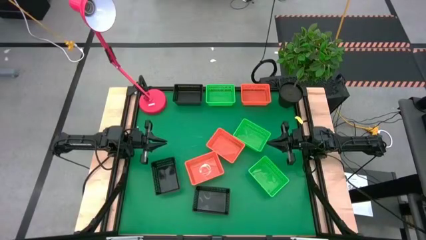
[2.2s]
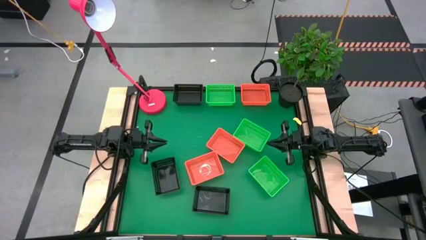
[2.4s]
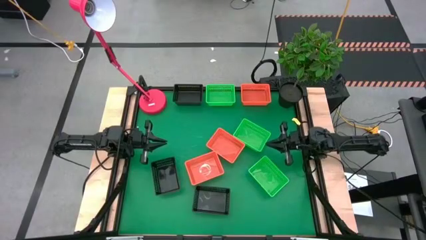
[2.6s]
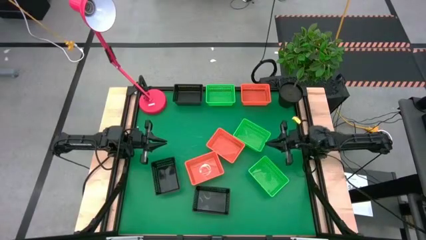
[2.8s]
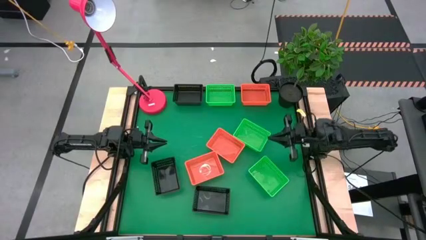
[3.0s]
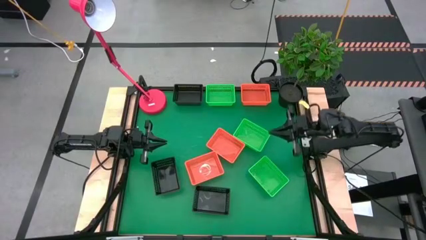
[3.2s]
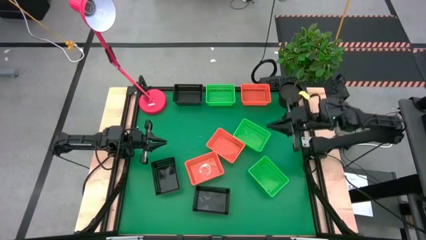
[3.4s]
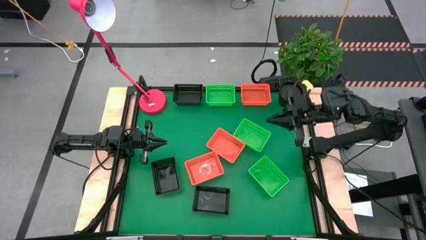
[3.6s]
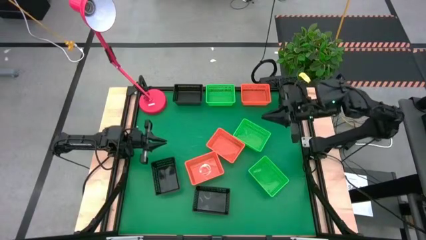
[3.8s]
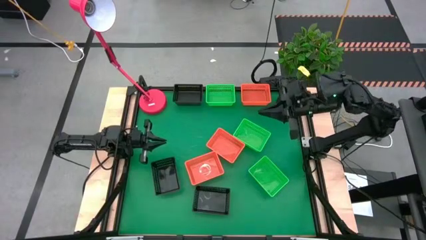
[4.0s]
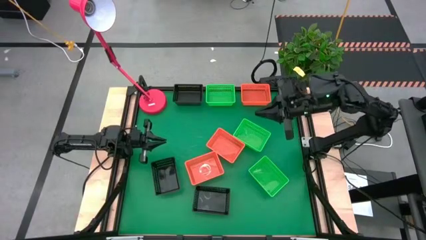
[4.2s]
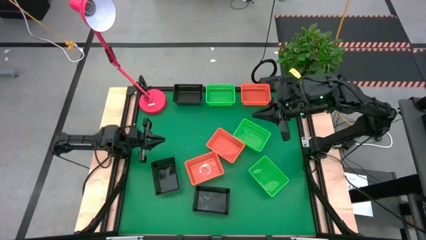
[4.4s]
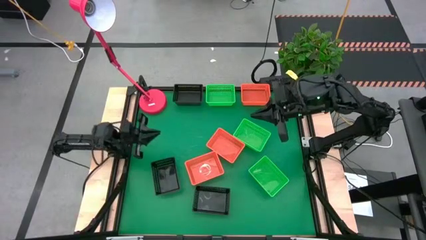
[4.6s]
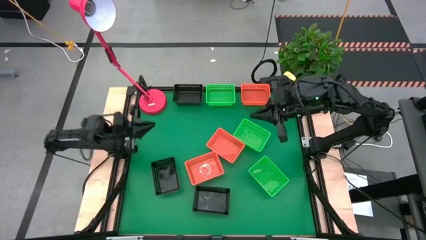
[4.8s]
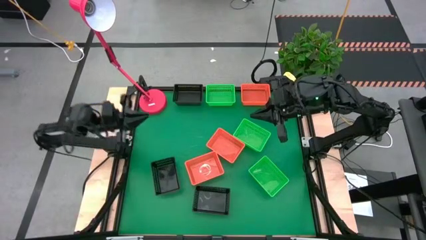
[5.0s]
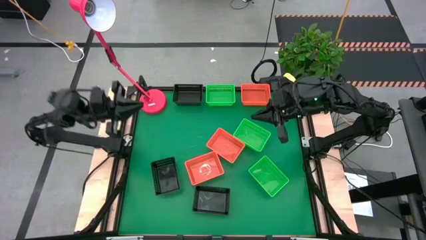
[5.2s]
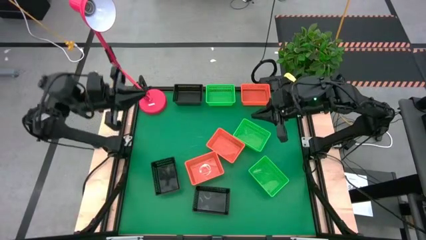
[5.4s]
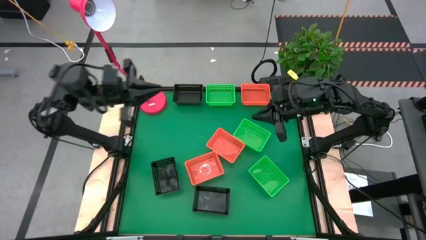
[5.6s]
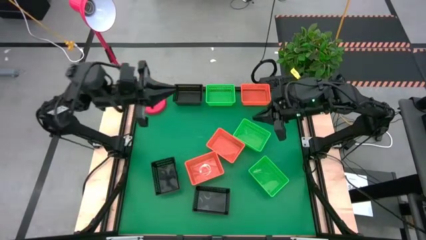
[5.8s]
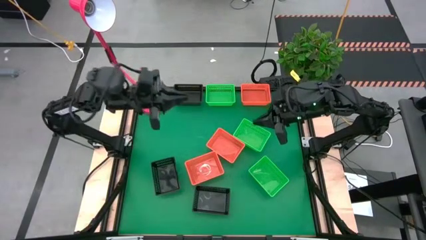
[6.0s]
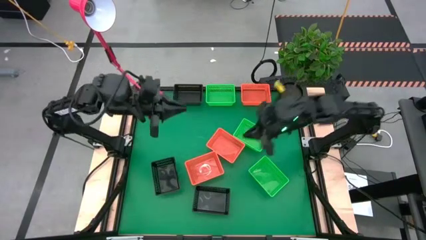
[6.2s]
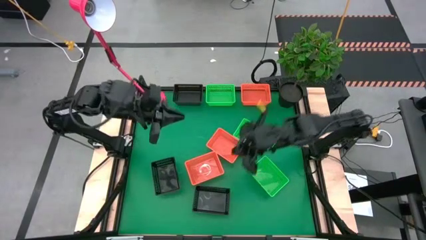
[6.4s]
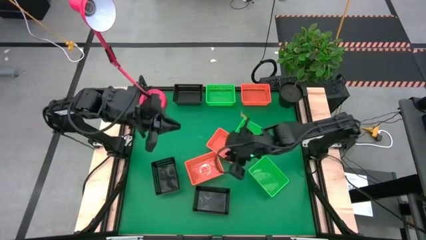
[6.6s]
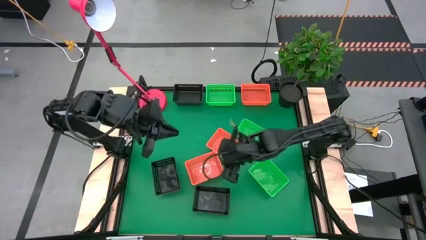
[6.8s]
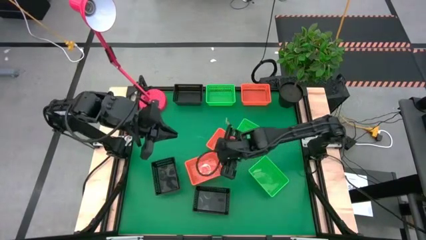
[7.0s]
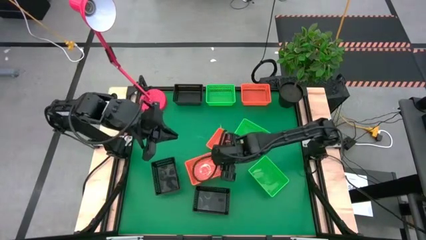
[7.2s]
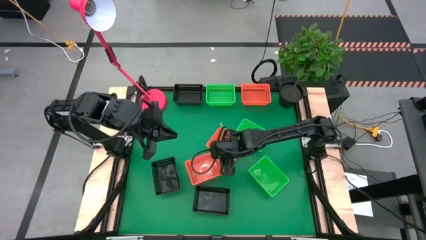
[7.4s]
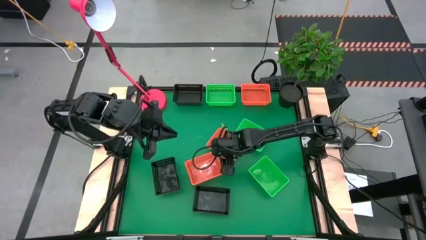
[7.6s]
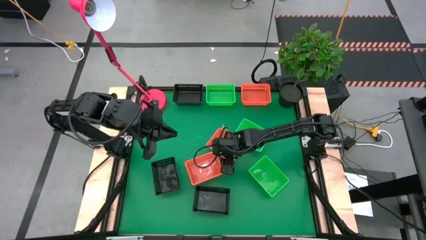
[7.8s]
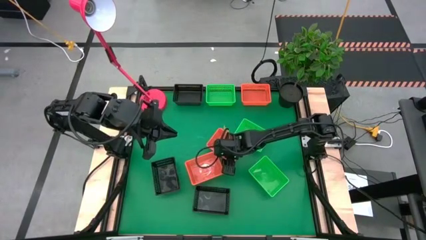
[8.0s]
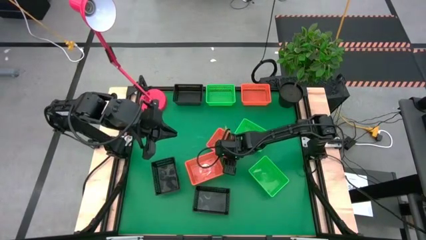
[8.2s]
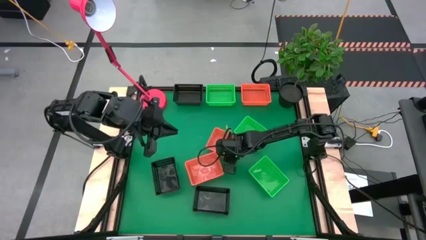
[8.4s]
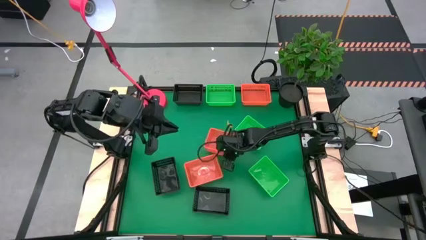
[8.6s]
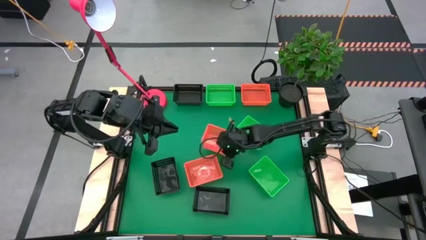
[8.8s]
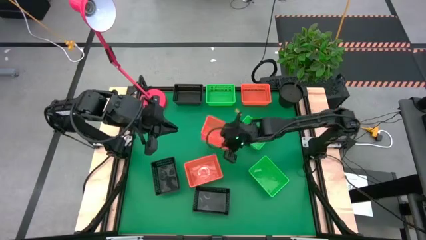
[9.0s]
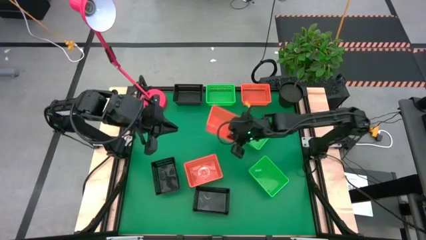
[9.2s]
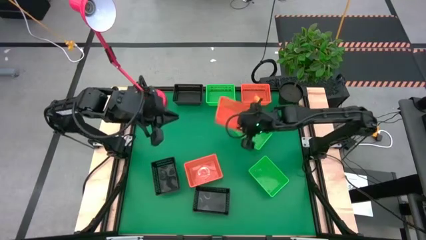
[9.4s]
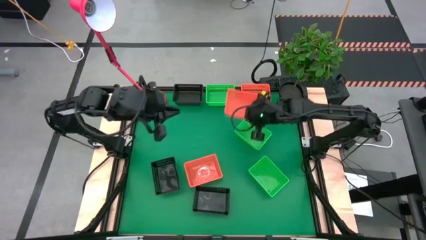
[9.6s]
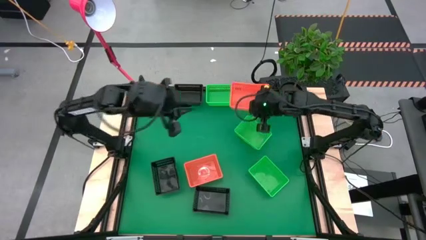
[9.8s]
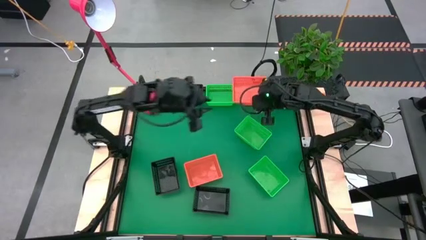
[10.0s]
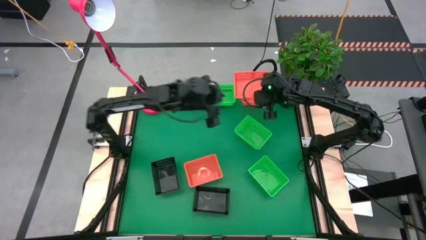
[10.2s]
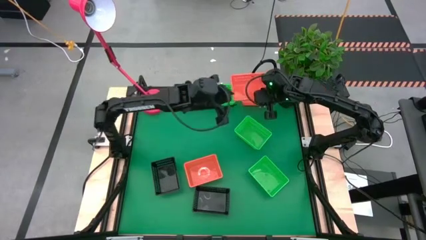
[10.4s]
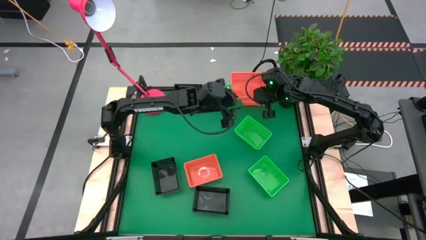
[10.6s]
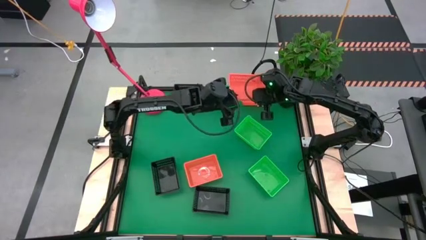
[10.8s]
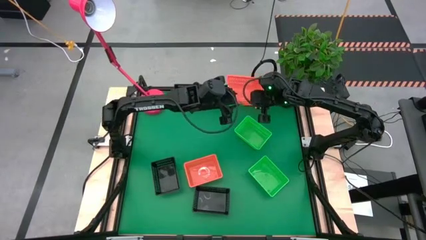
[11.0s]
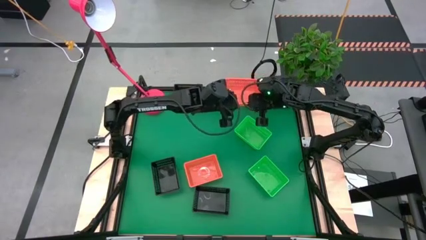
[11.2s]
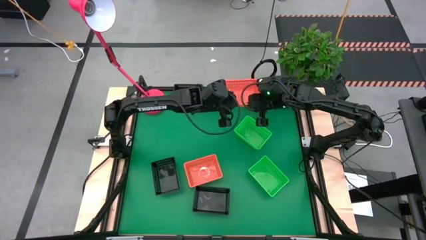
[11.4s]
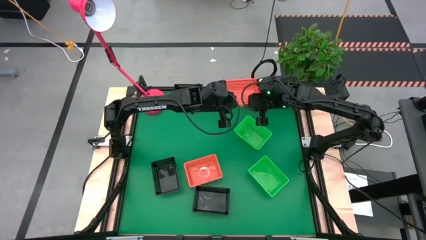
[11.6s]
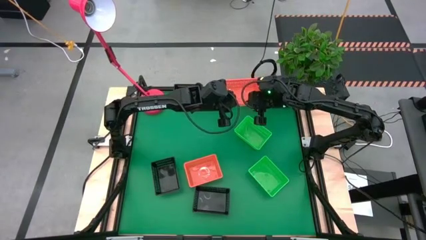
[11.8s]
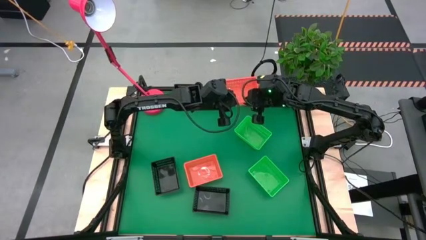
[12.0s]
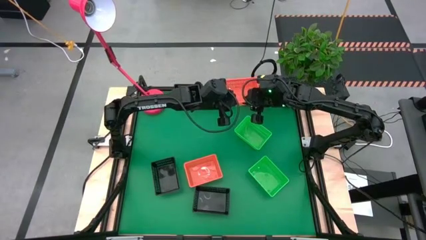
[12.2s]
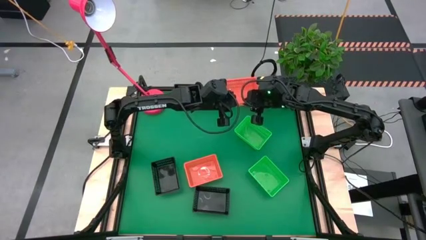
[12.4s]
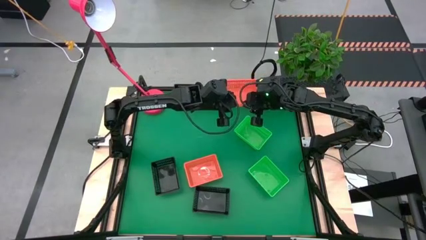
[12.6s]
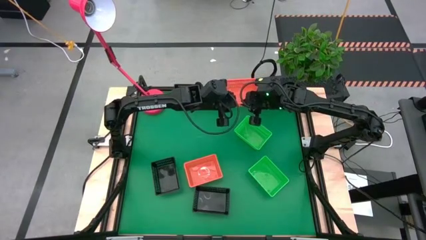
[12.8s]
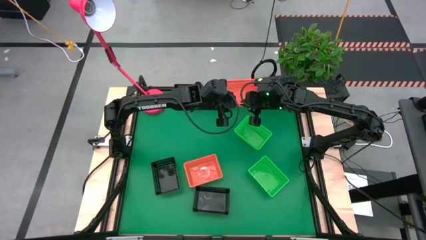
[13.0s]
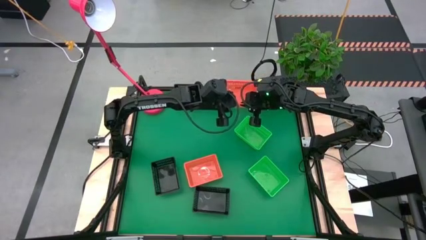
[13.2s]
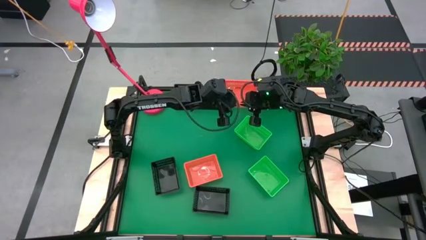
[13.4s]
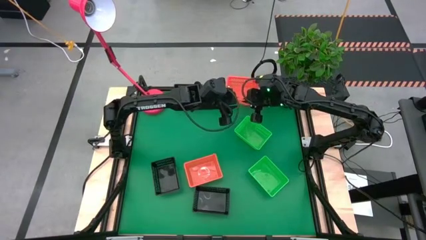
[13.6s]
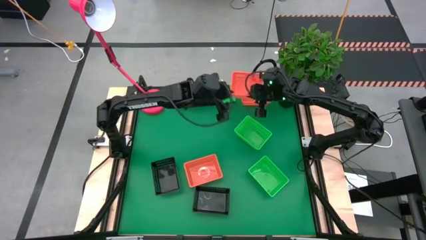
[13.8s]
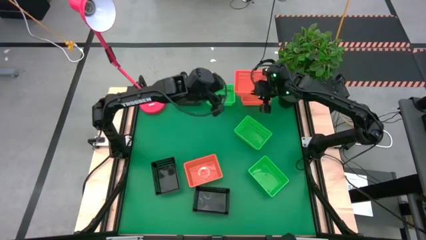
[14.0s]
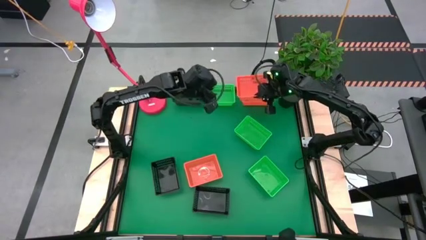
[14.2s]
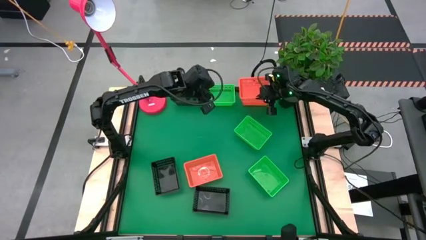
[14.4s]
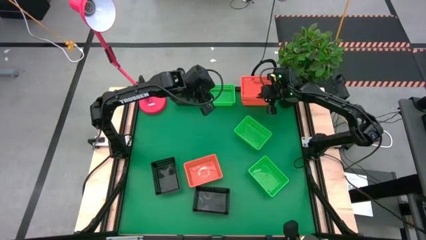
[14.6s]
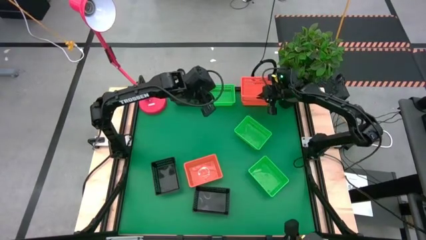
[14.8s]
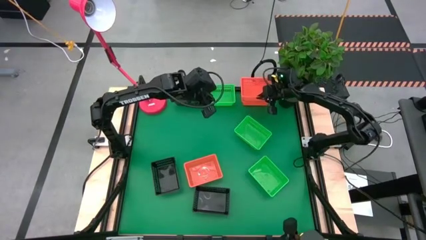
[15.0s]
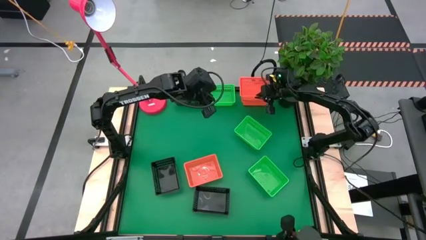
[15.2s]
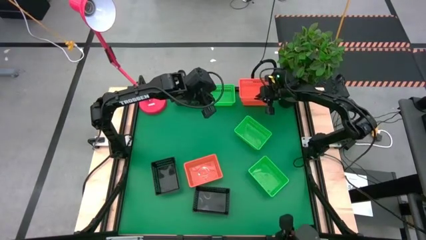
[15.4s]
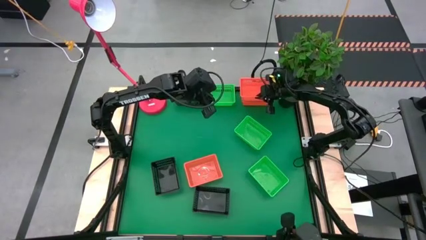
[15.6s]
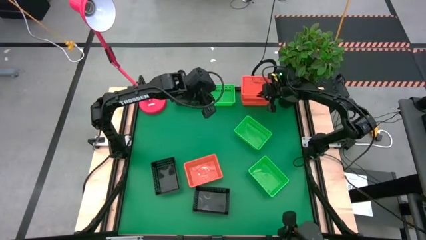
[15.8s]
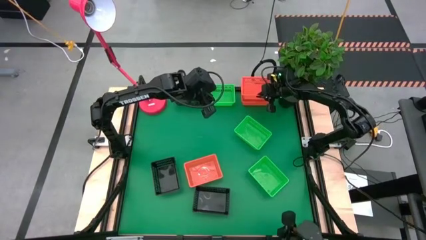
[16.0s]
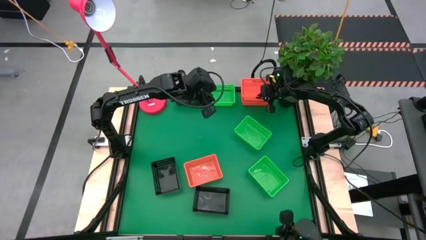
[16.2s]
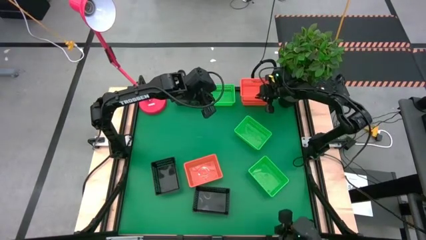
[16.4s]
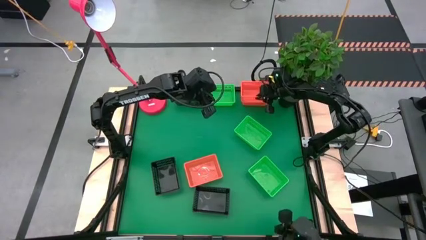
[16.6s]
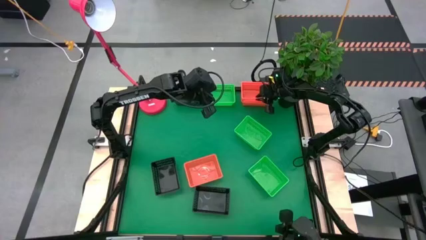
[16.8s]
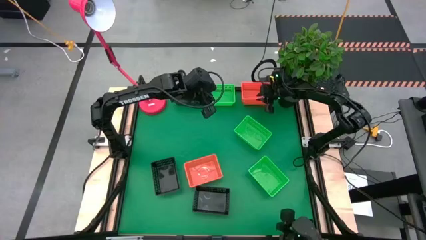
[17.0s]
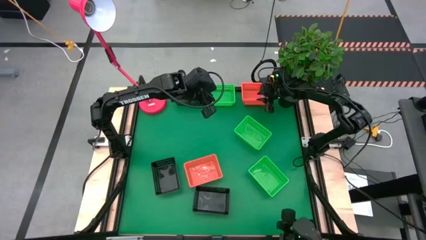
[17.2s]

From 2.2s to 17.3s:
Stack the middle orange bin on top of the top orange bin
